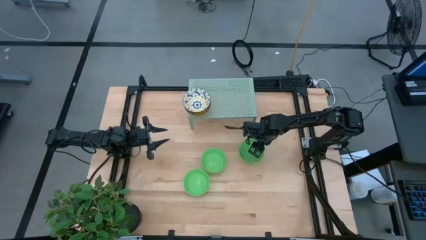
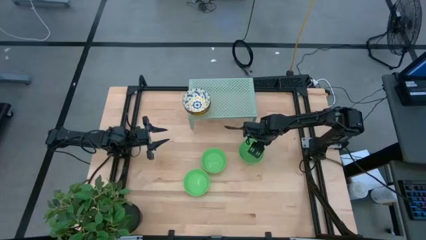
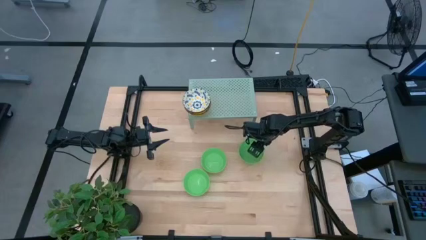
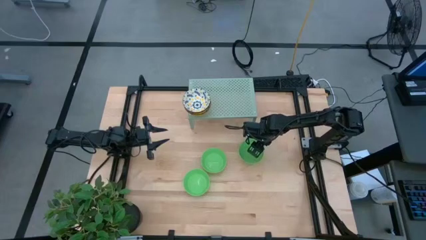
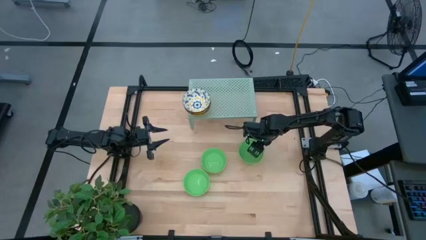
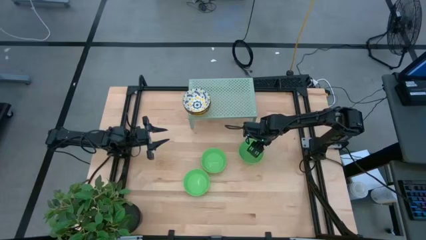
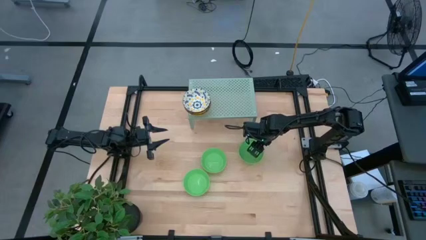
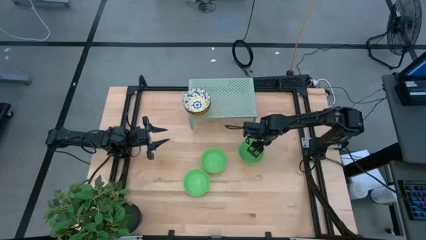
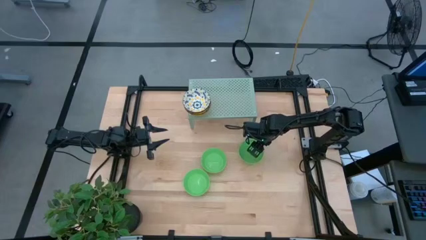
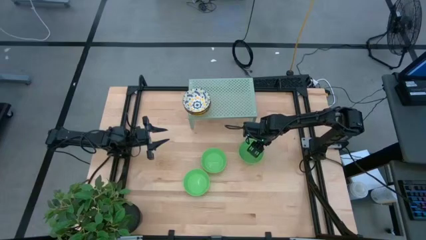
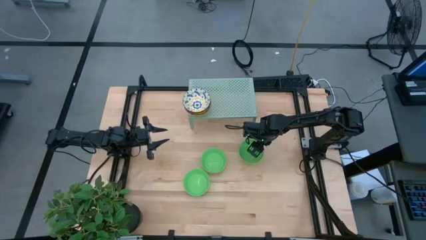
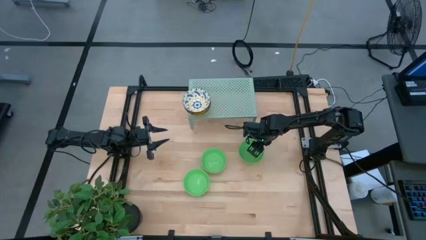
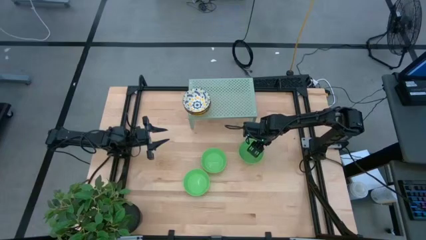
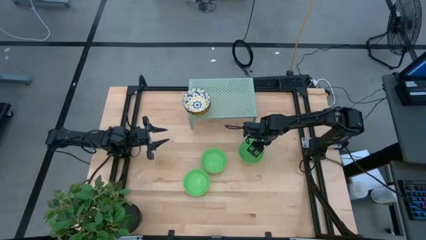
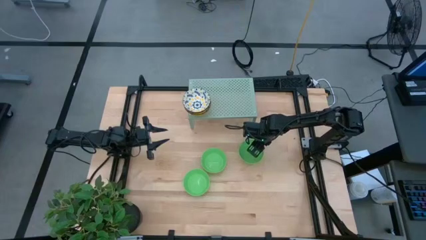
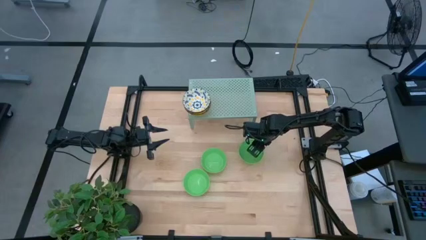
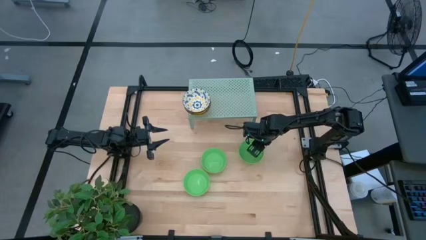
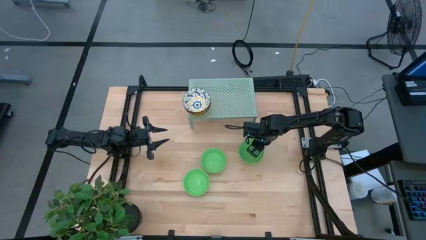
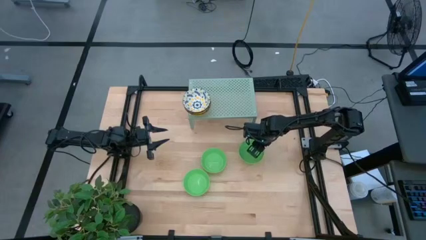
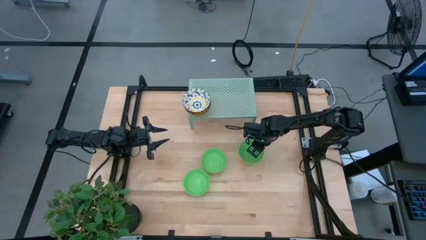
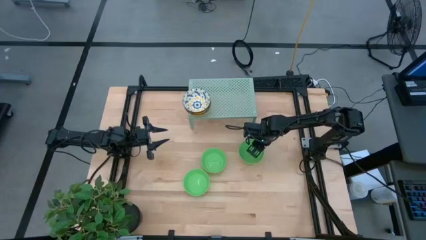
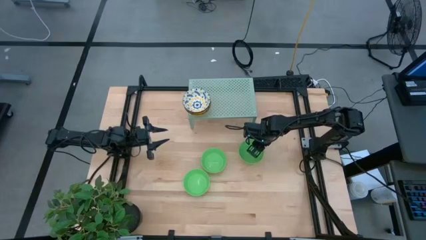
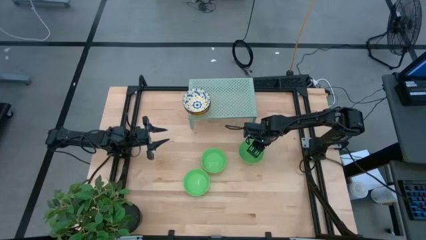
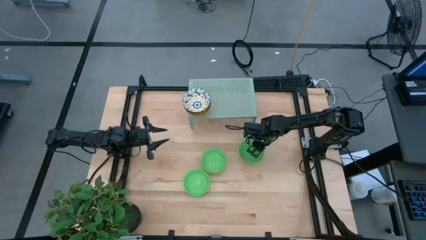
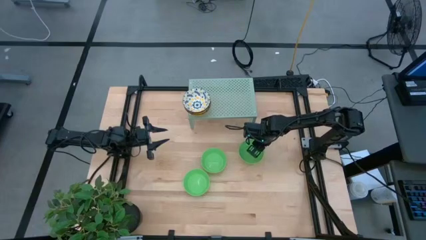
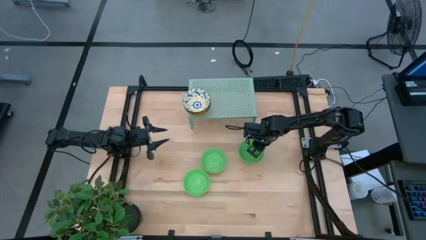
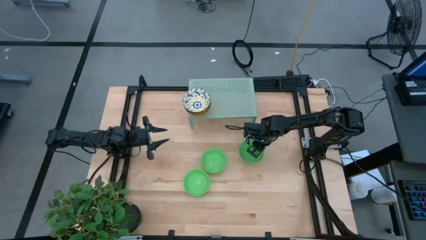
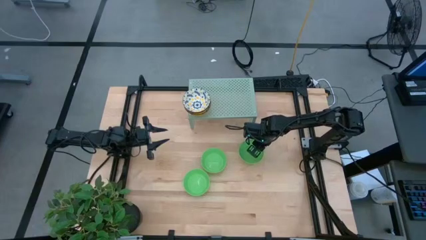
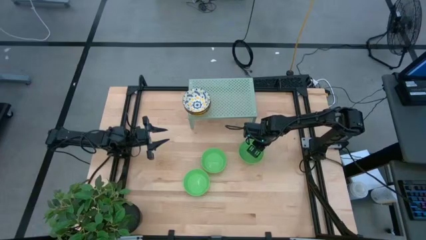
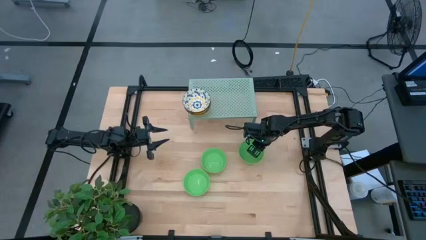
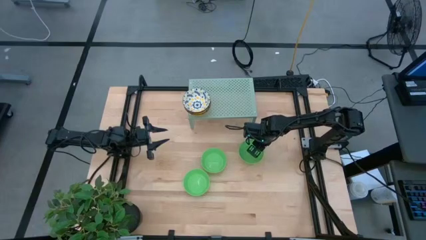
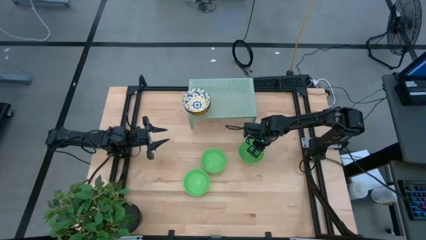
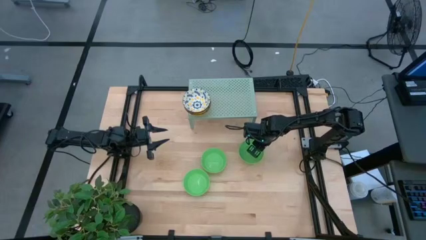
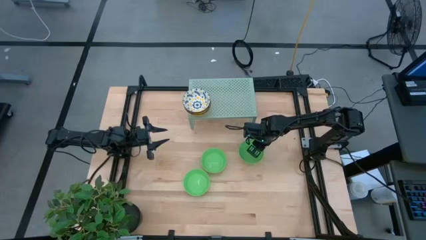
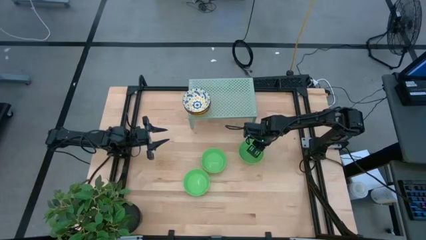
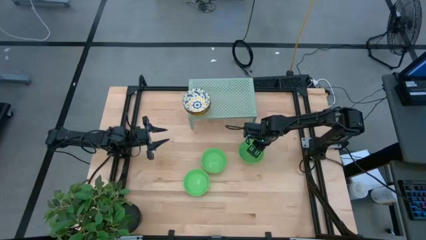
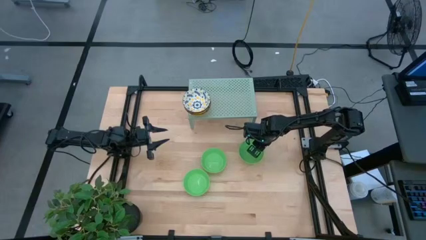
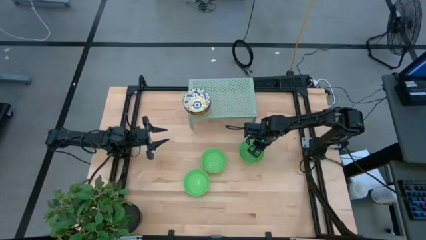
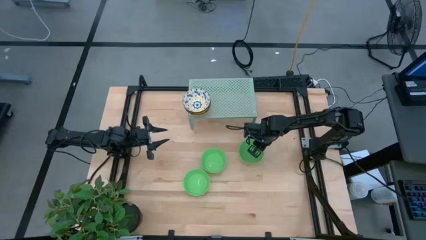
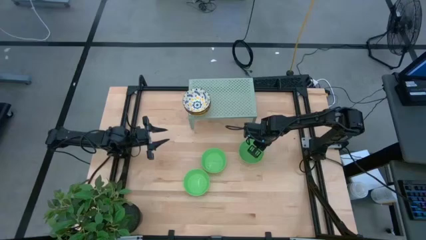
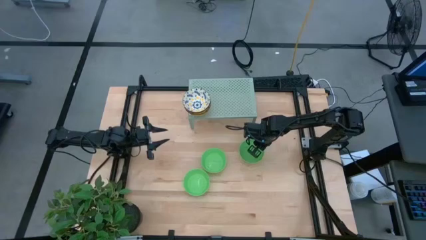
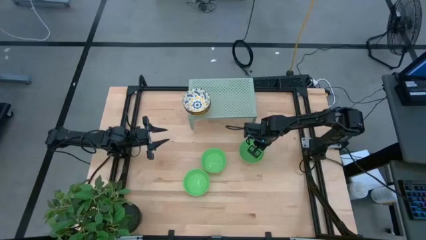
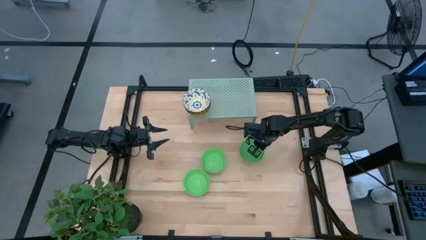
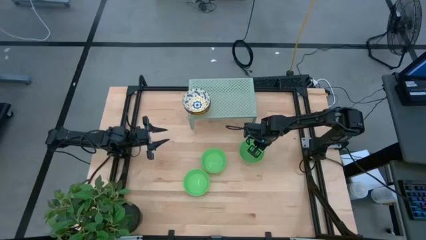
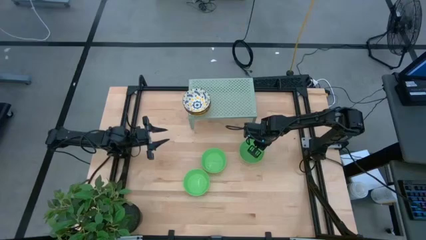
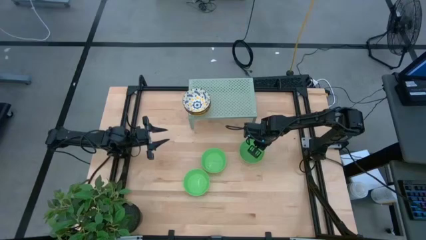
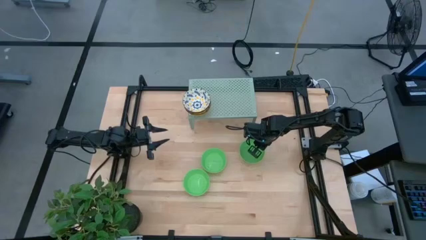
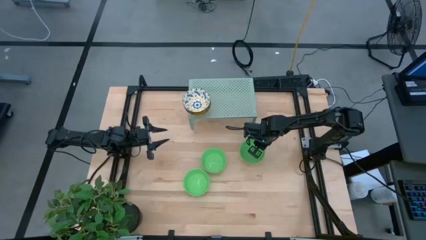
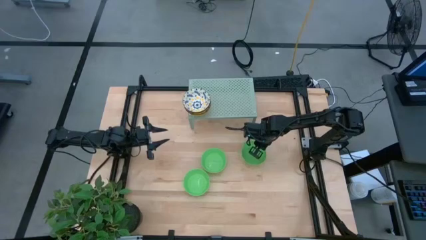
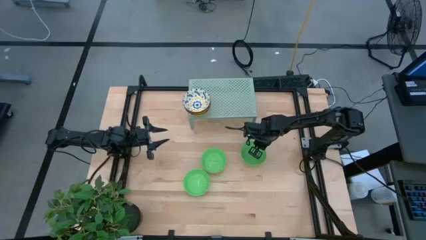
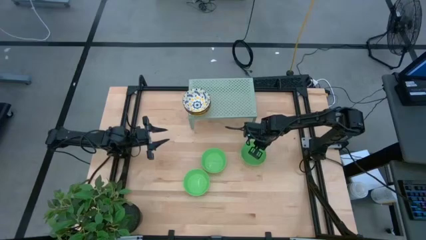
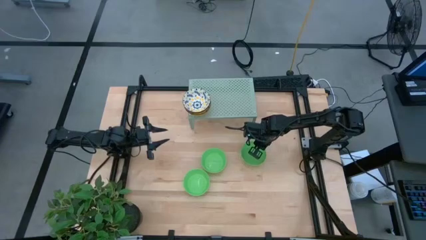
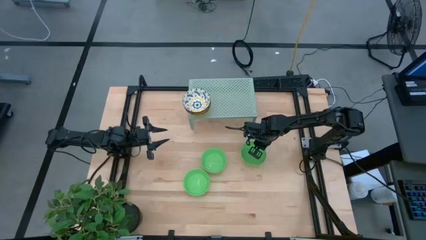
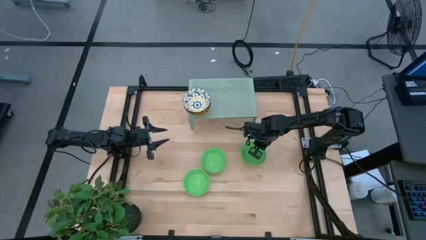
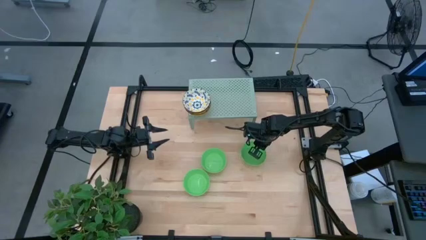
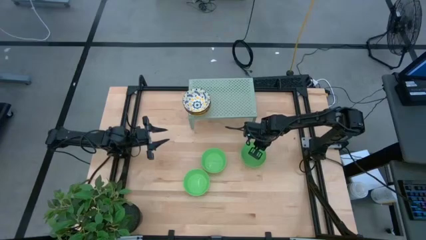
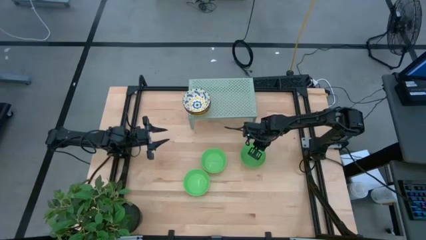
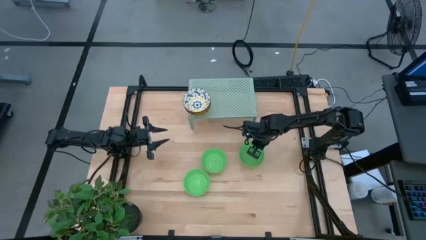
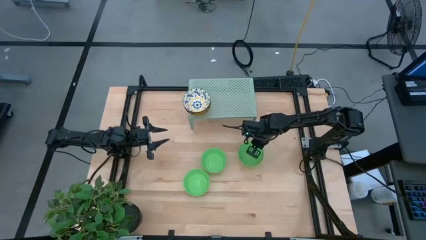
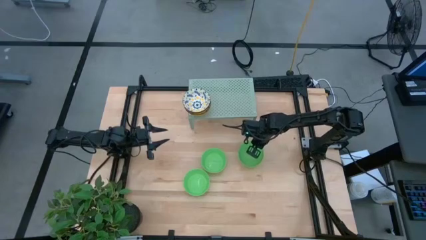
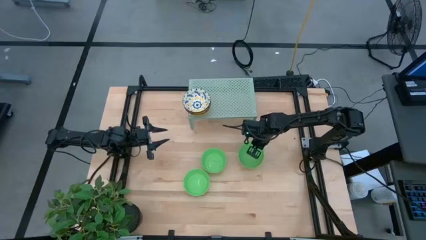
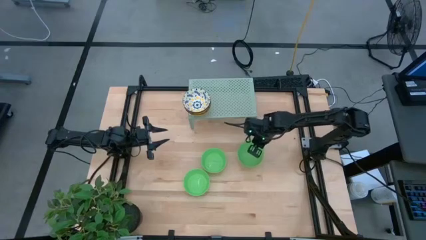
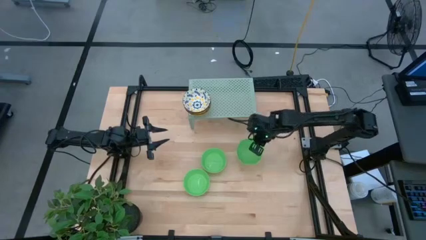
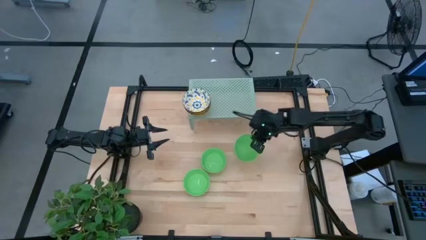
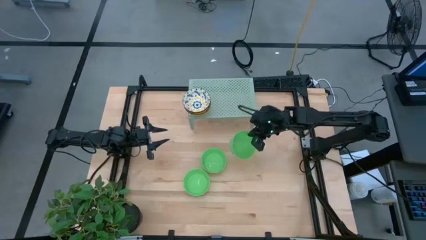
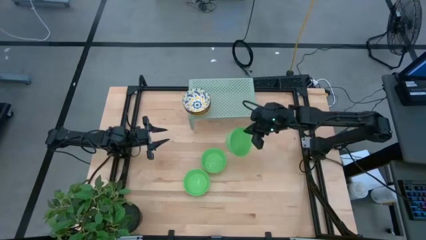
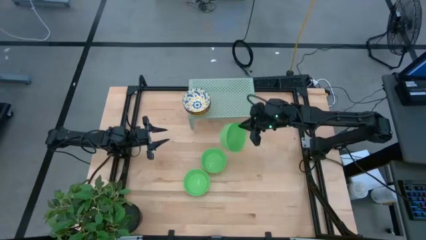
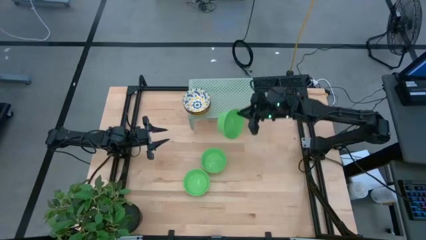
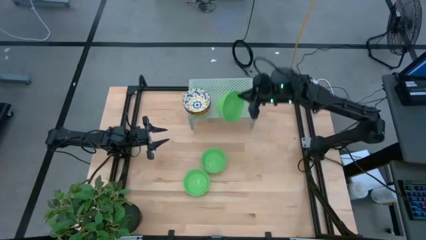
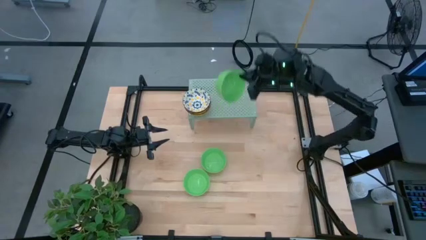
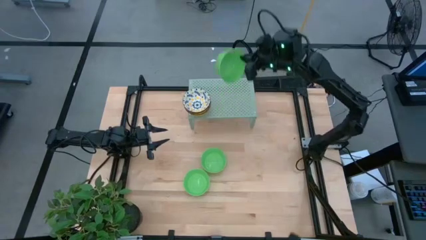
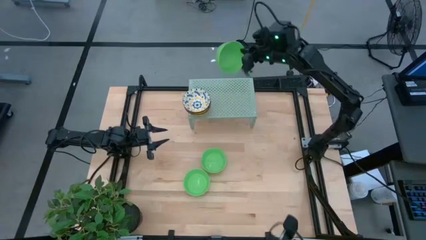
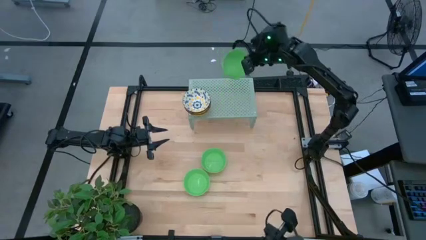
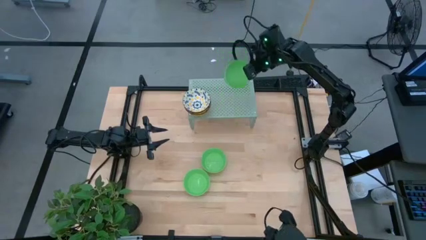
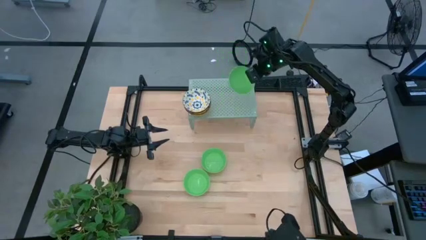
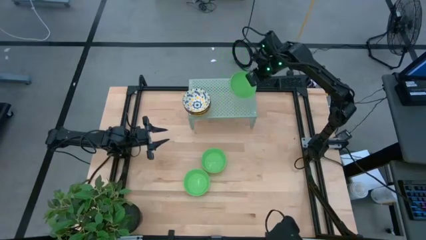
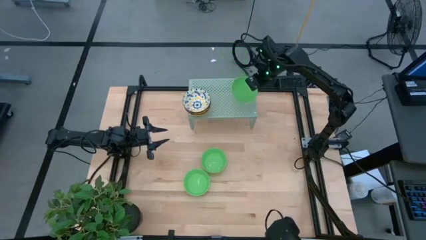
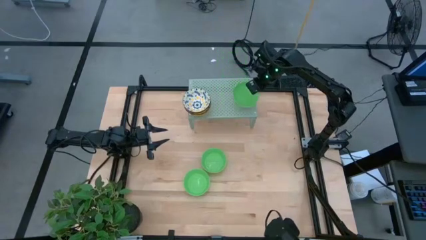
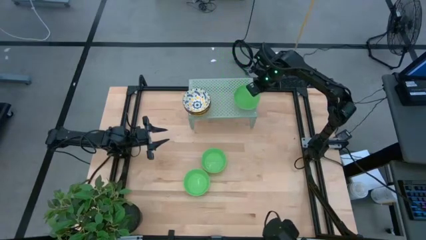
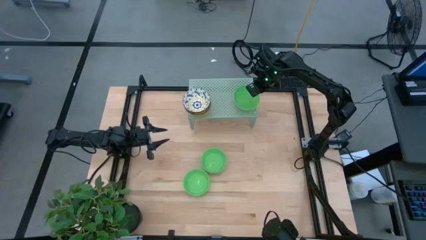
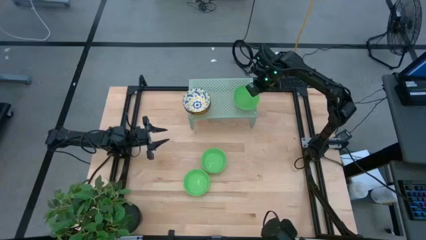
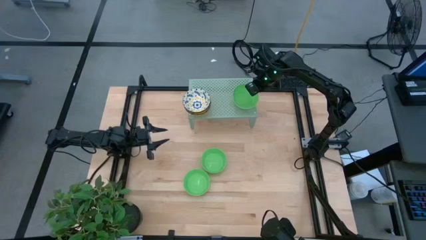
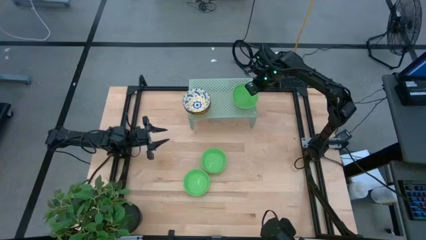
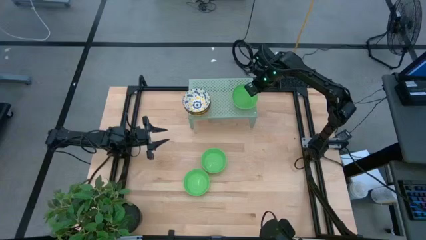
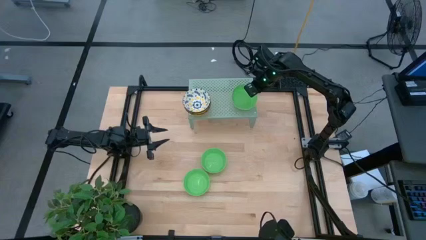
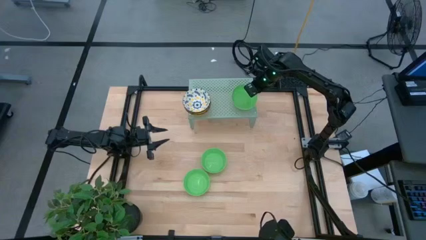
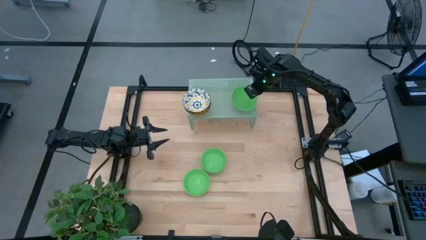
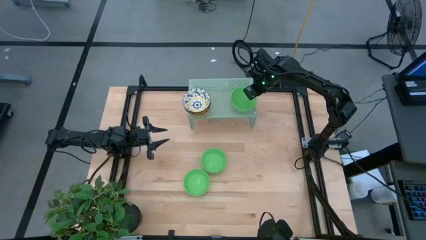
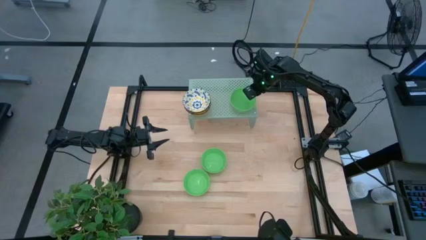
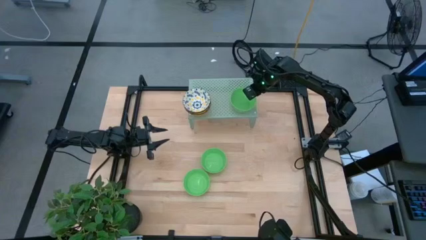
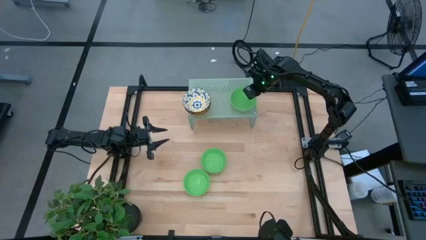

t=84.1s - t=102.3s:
Task: Pick & Place Mini bowls
Put the top right green bowl on the shelf
